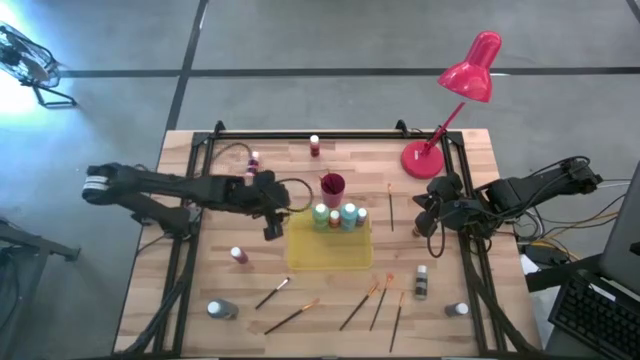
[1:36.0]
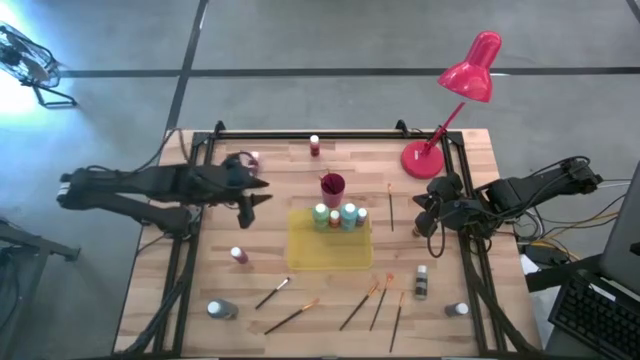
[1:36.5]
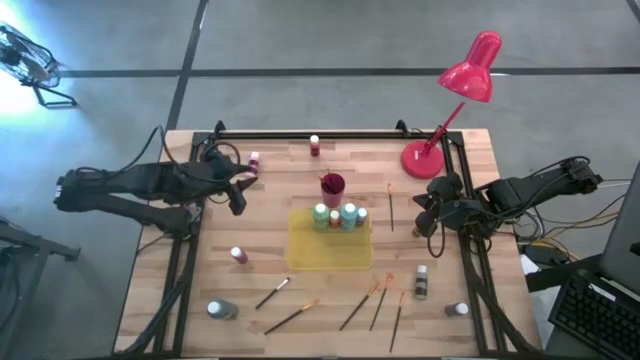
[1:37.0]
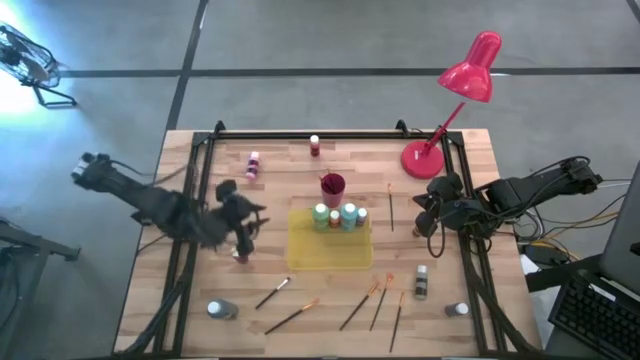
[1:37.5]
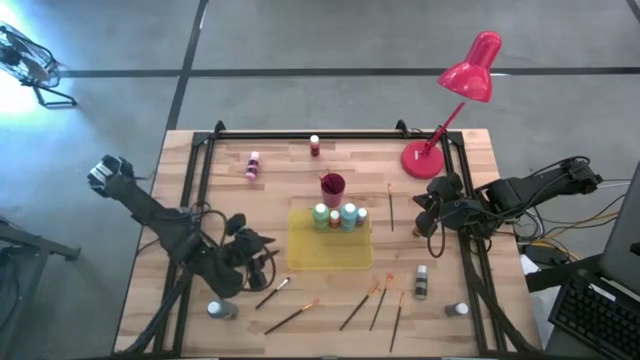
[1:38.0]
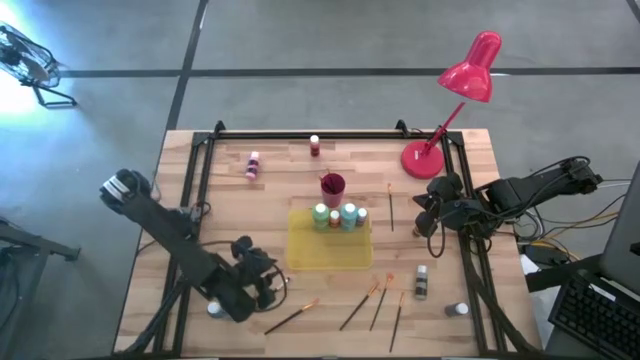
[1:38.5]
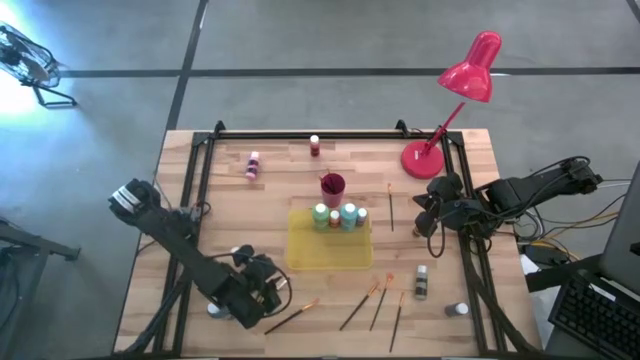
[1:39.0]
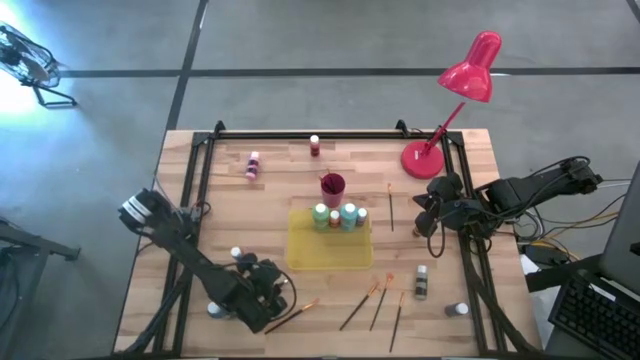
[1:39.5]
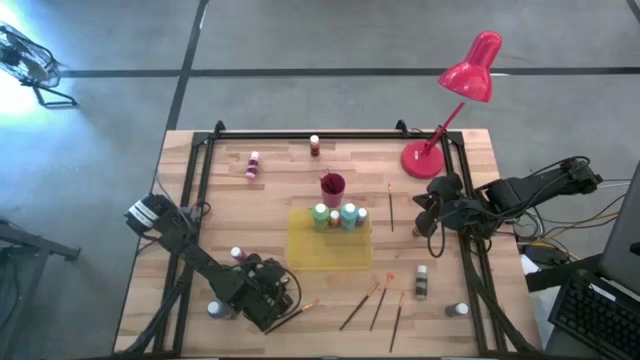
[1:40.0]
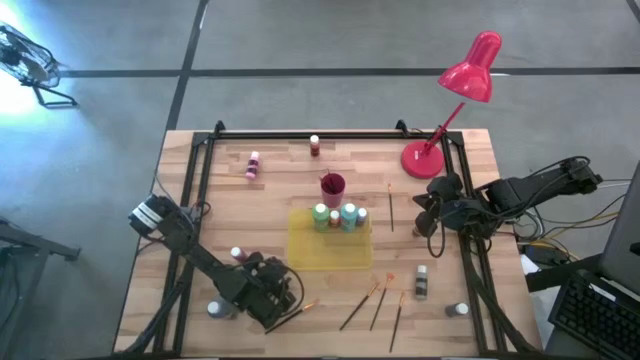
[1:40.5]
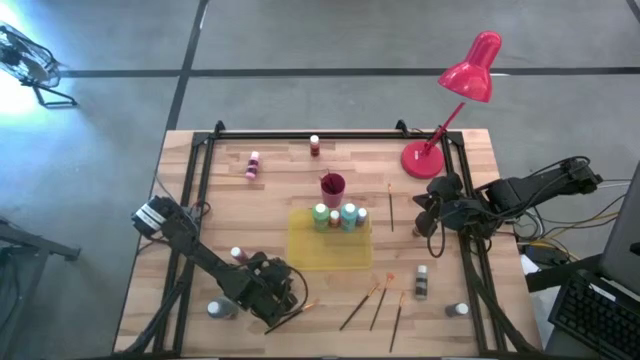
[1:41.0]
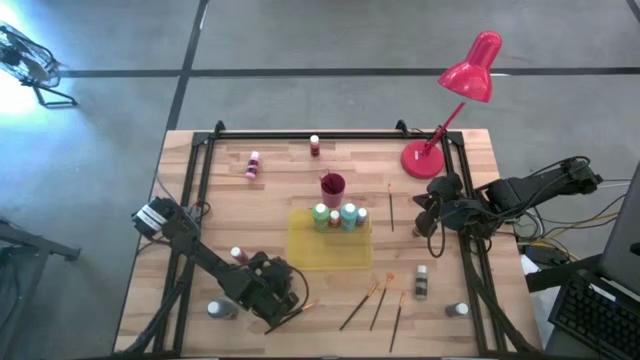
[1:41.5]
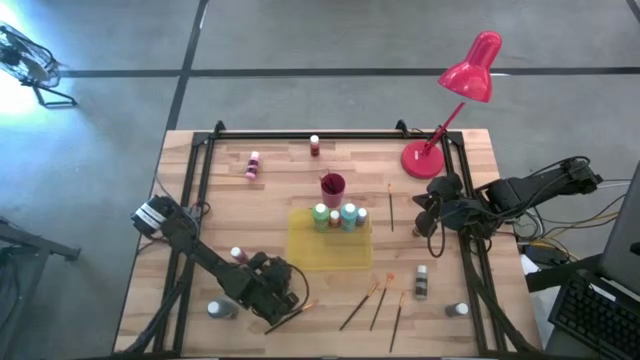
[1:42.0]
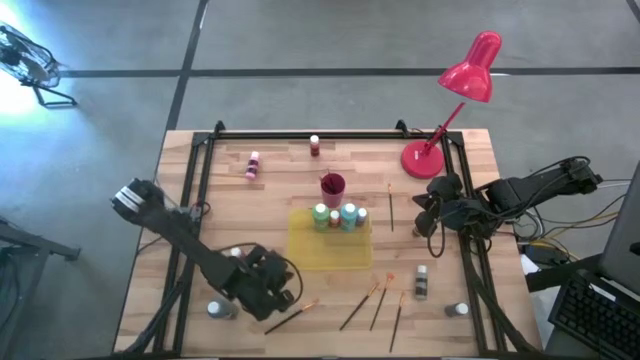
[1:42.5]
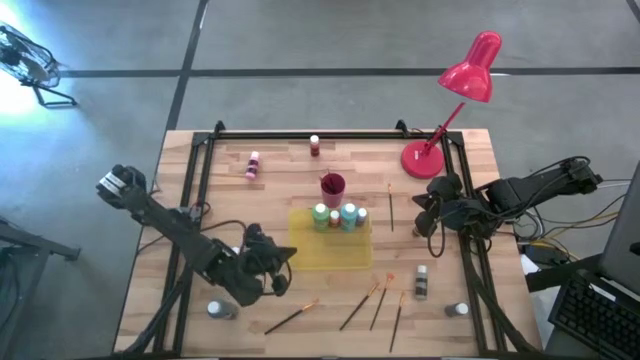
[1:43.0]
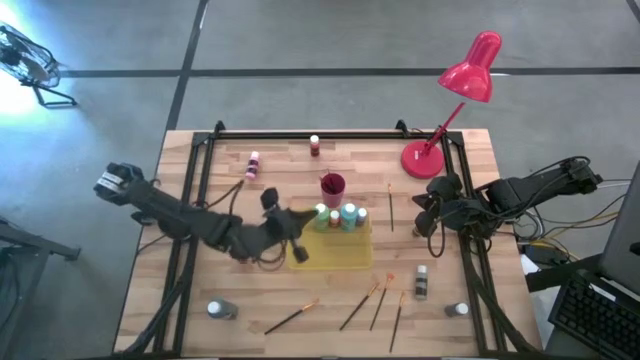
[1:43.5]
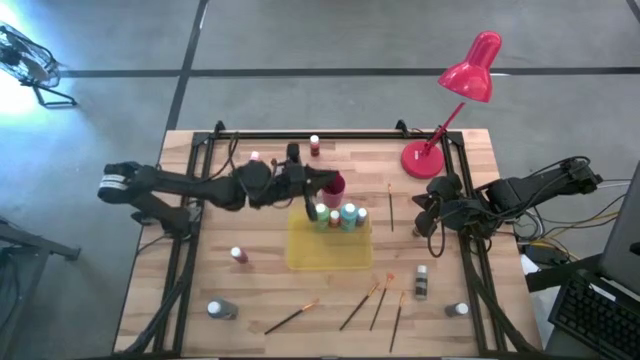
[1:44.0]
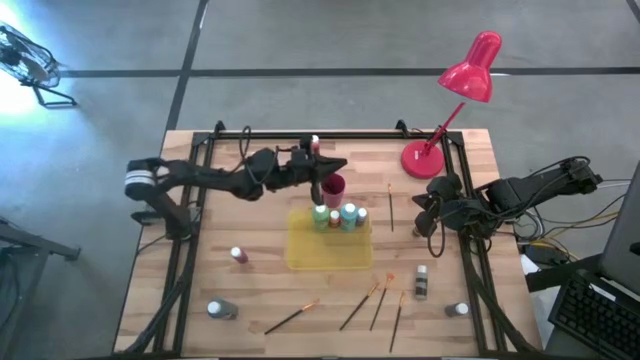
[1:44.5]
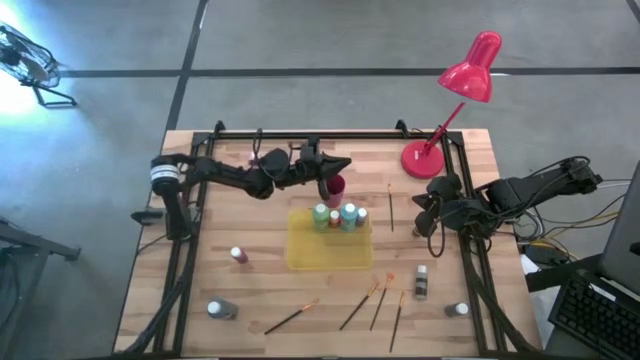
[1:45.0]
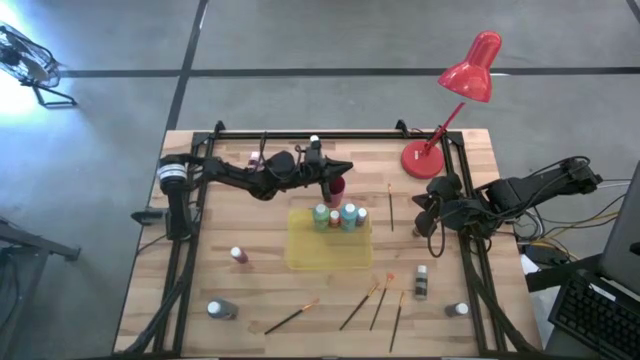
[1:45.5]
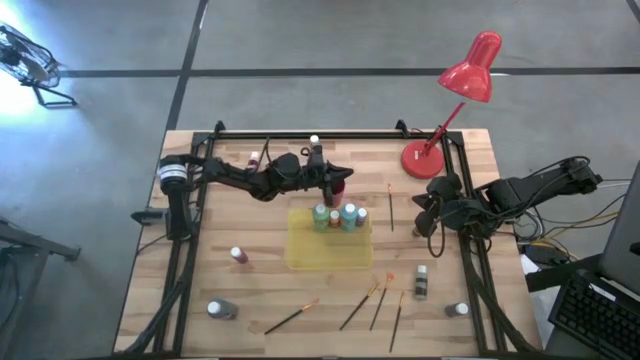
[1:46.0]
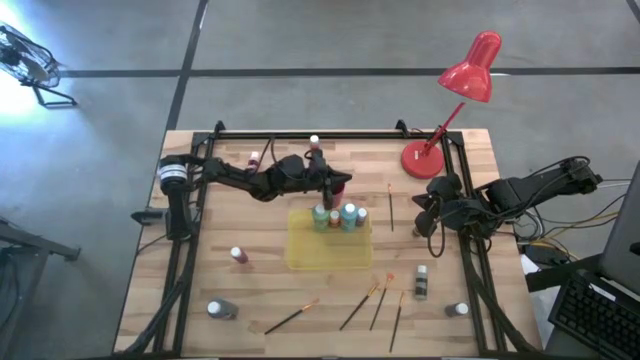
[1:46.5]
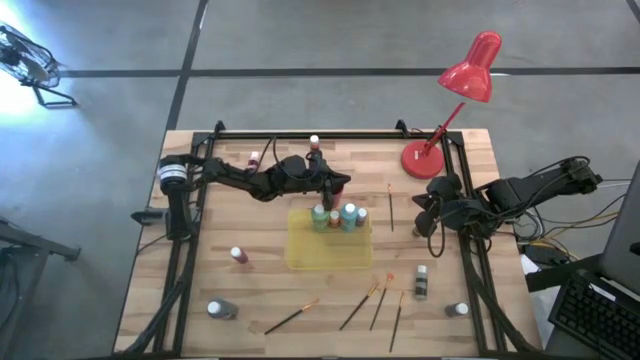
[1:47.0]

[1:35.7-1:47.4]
Task: Pick & Place Paint Supplies
Put the silver paint brush into the pink cup

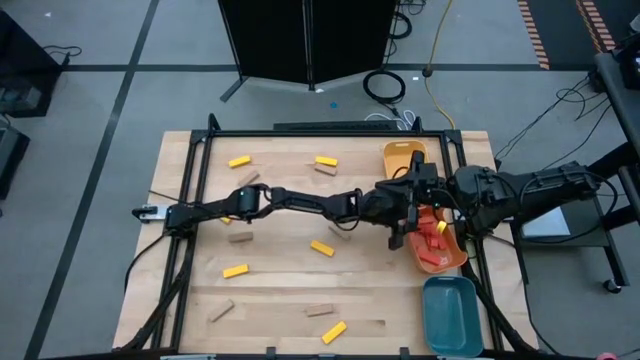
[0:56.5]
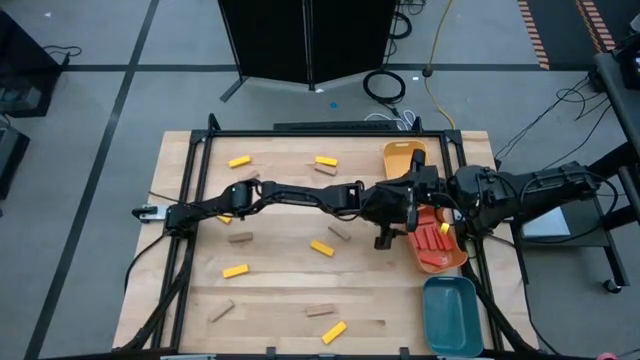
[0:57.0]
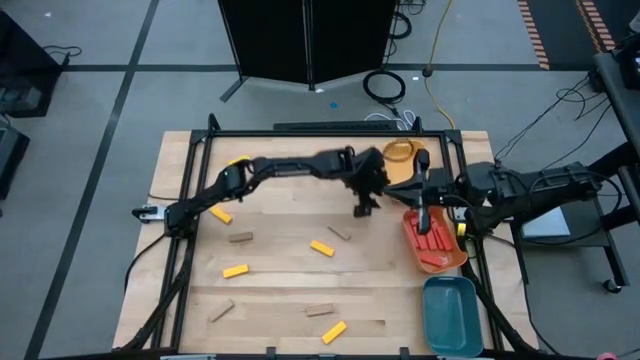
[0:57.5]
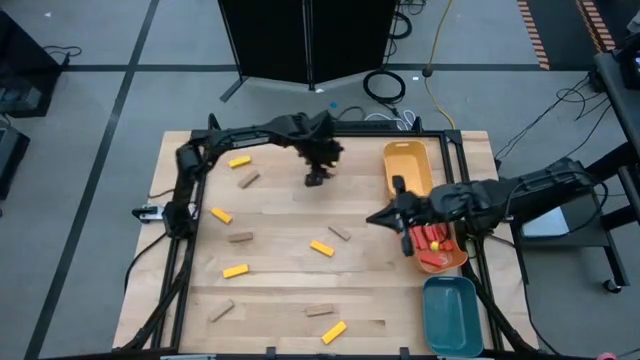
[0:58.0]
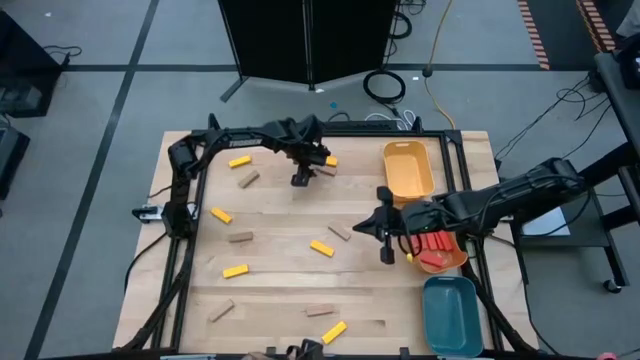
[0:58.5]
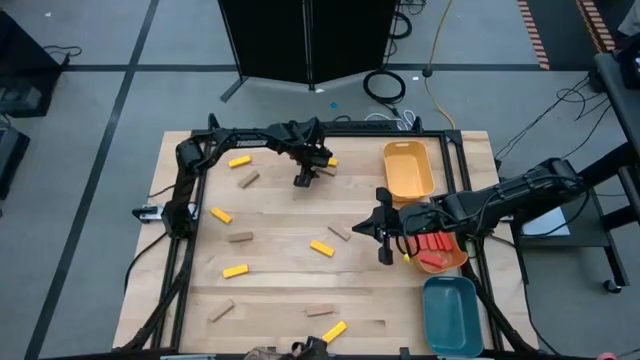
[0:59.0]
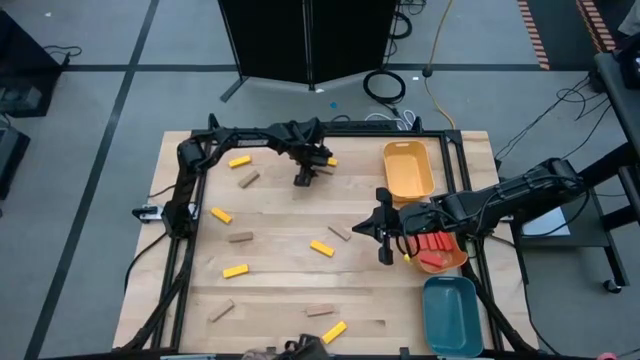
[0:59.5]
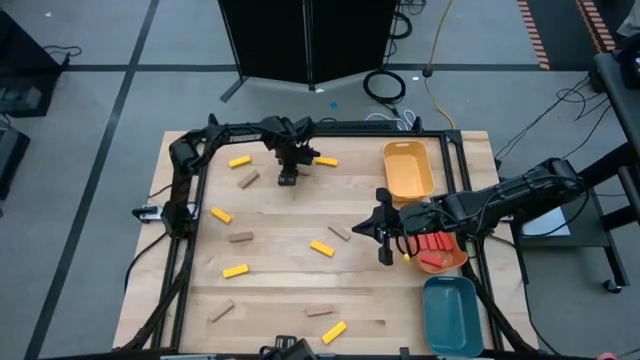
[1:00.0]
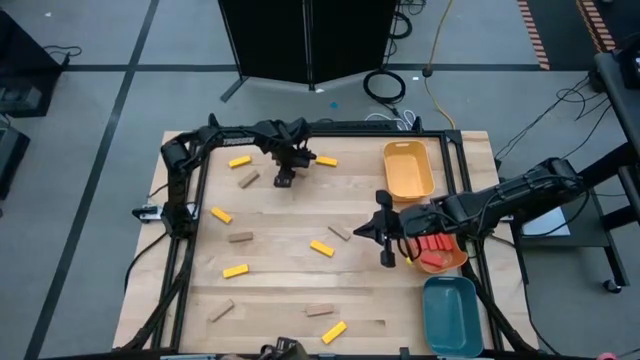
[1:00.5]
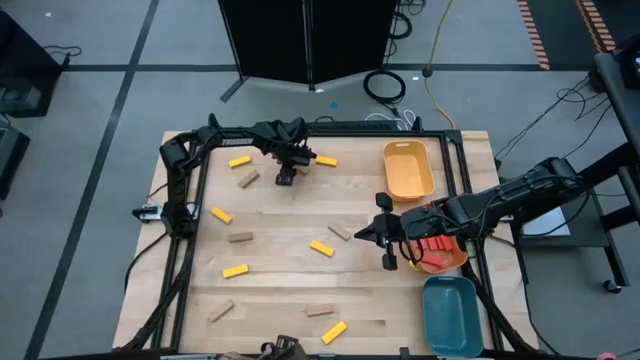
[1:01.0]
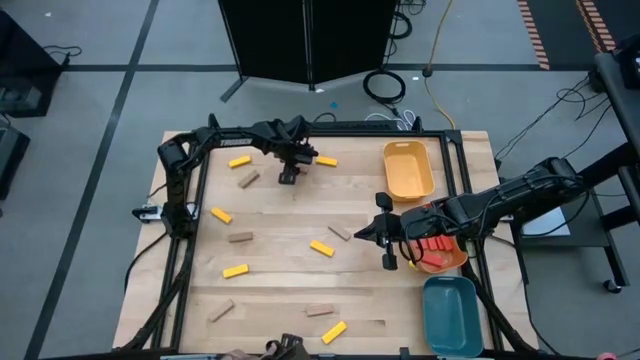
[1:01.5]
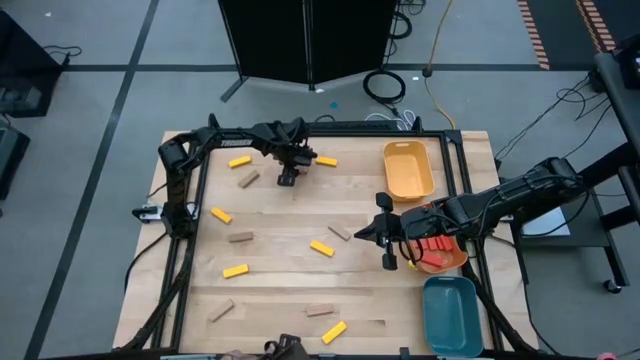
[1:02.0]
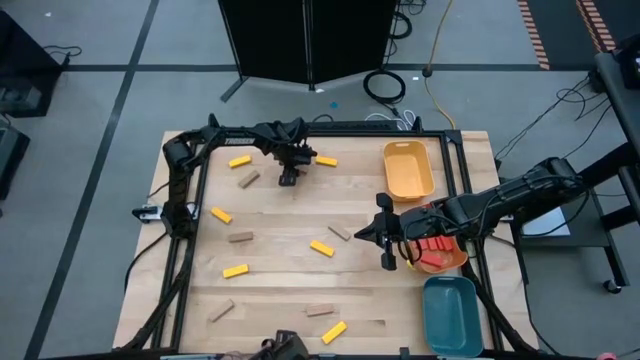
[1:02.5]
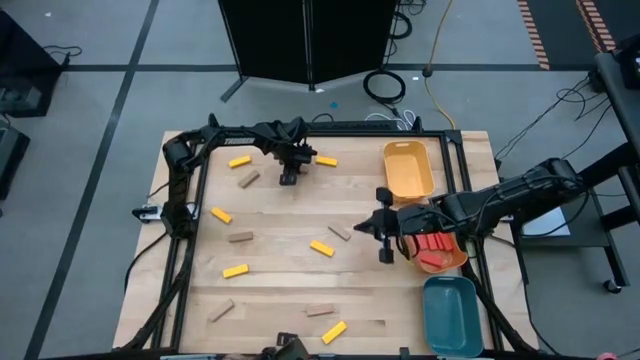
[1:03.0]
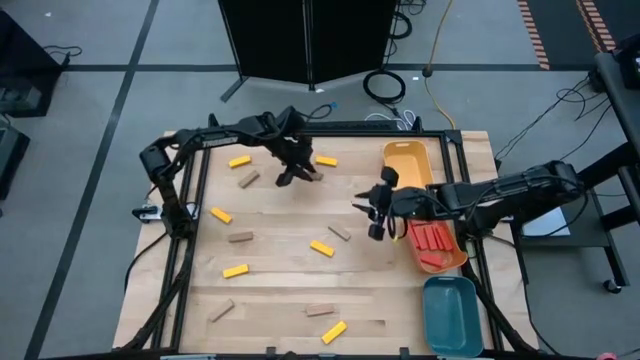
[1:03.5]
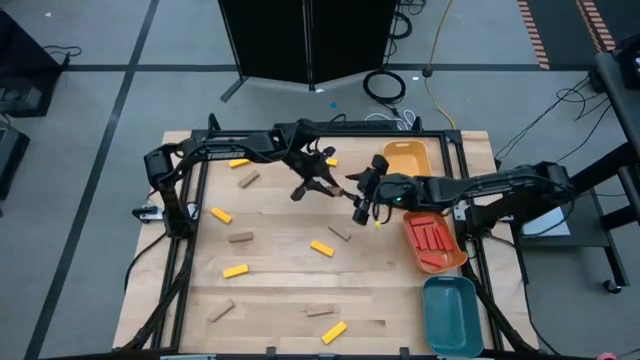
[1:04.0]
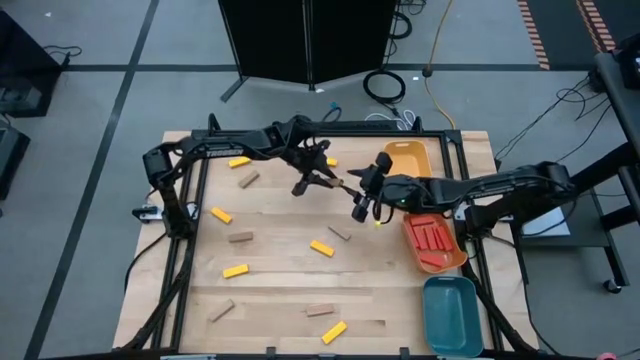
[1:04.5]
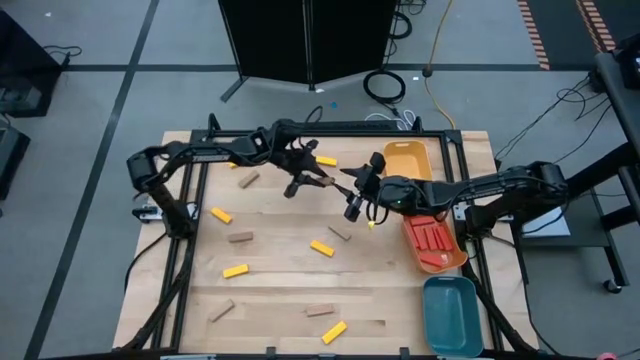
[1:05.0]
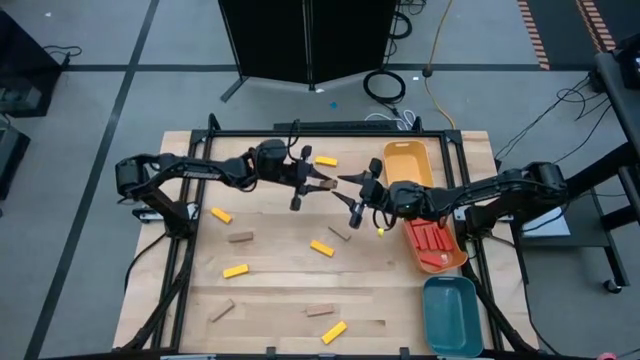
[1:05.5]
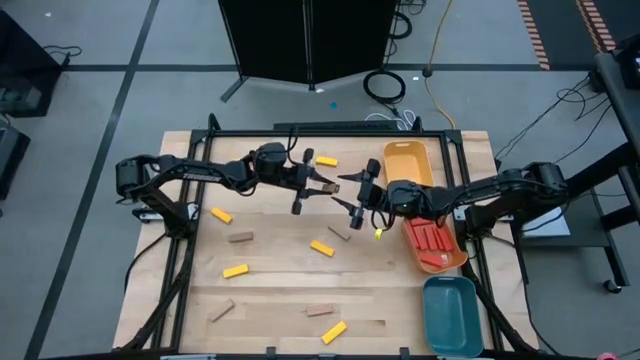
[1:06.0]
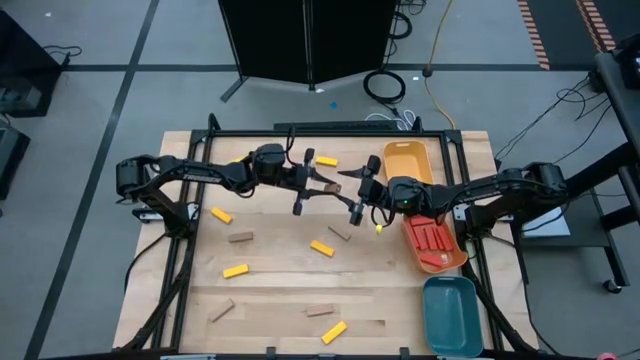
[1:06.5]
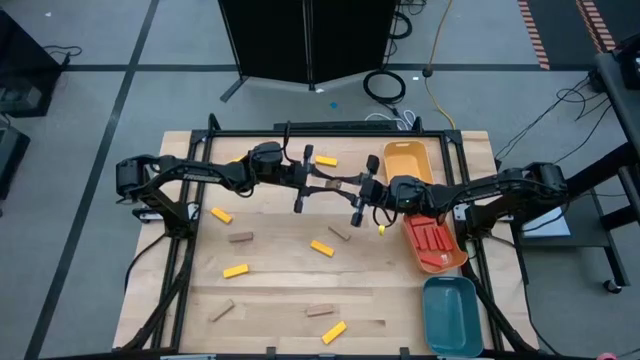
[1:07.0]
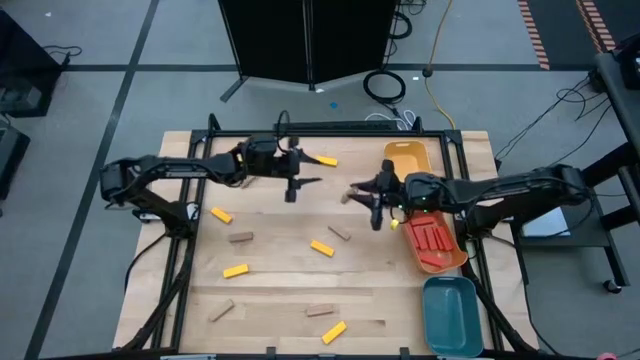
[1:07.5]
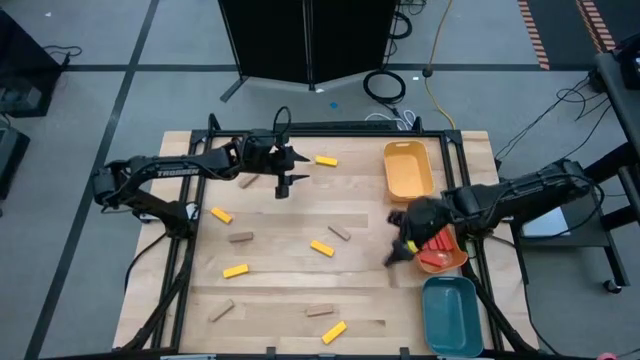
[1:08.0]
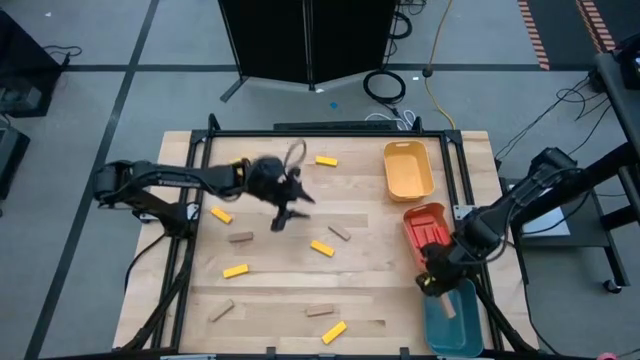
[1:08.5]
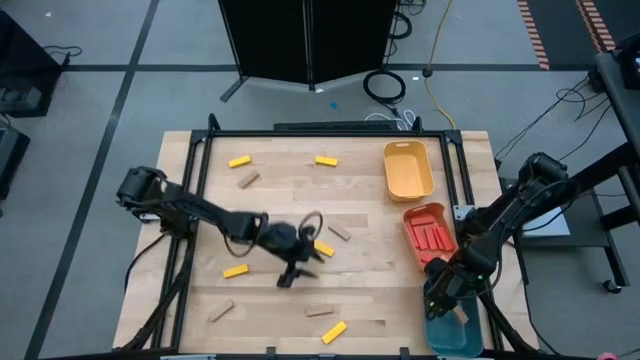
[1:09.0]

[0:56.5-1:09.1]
Task: Sort blocks
Put the brown block into the blue bin
